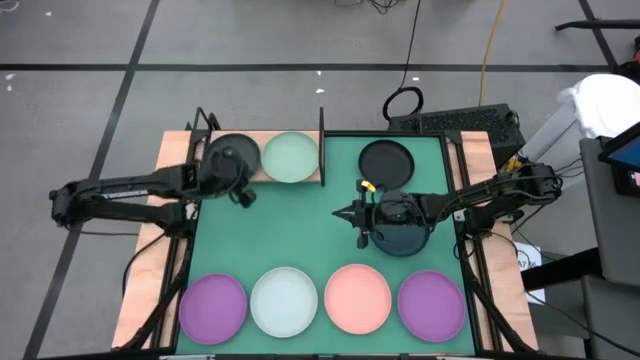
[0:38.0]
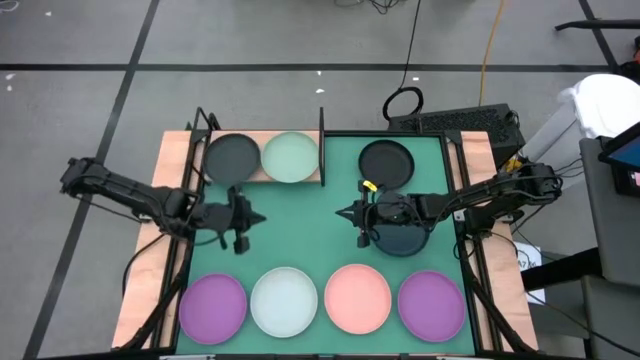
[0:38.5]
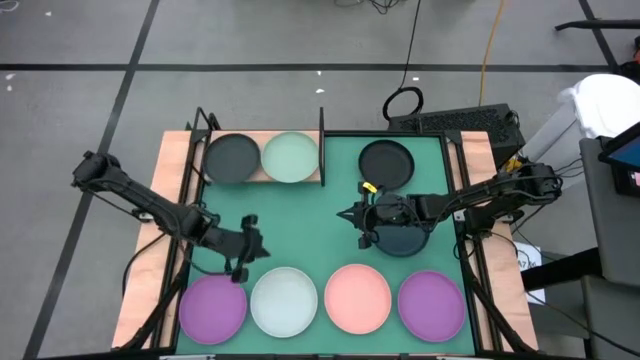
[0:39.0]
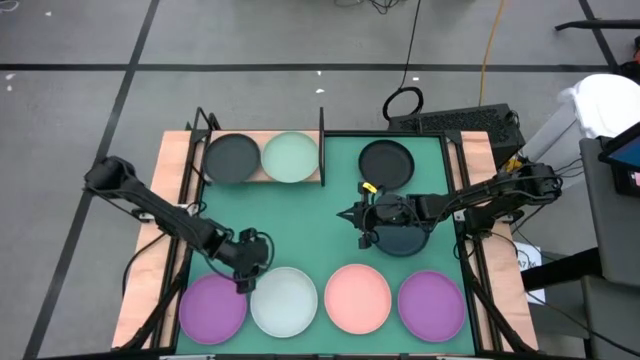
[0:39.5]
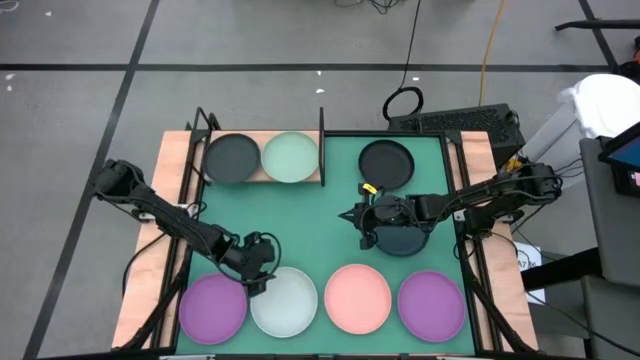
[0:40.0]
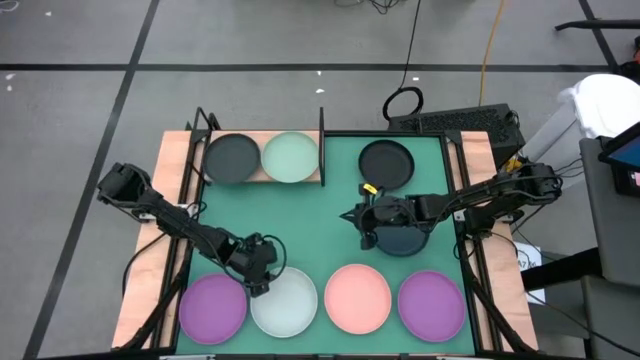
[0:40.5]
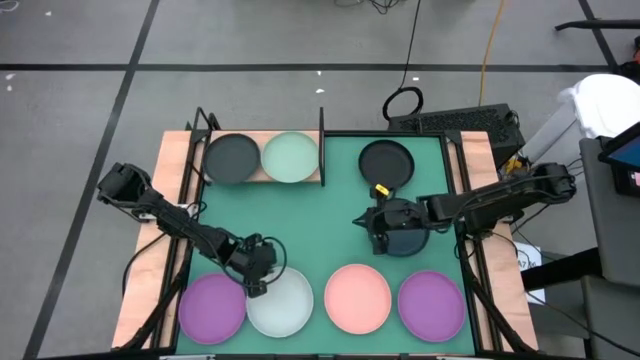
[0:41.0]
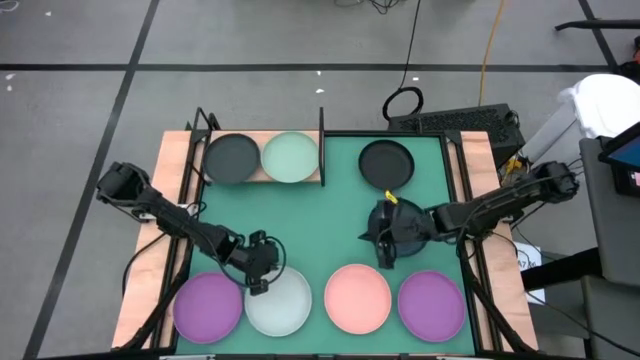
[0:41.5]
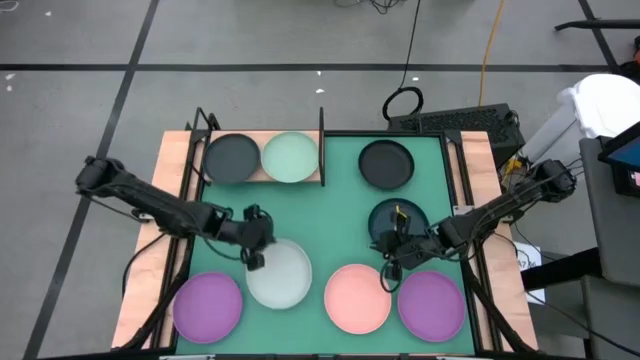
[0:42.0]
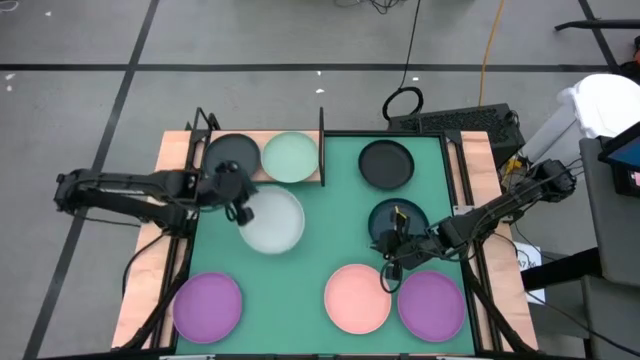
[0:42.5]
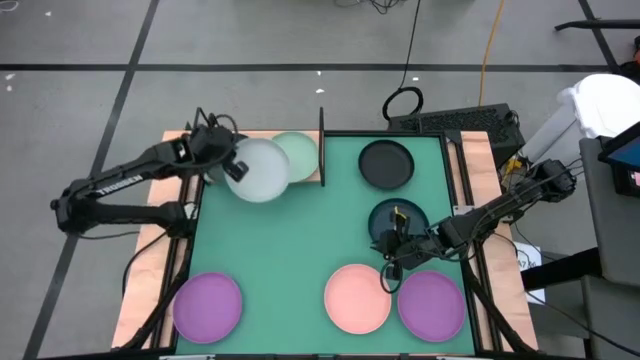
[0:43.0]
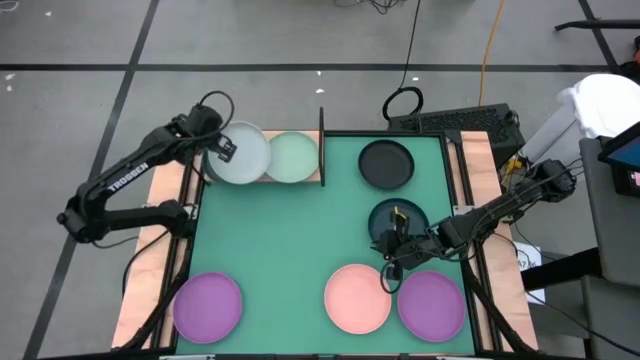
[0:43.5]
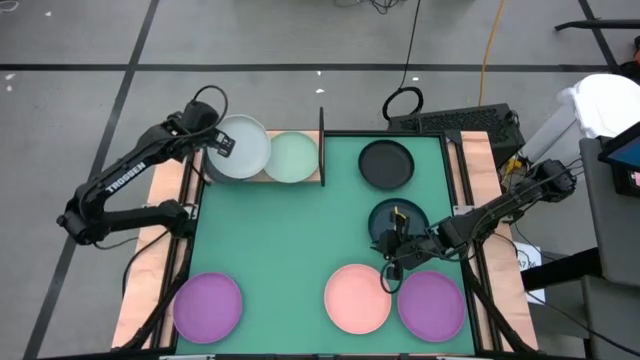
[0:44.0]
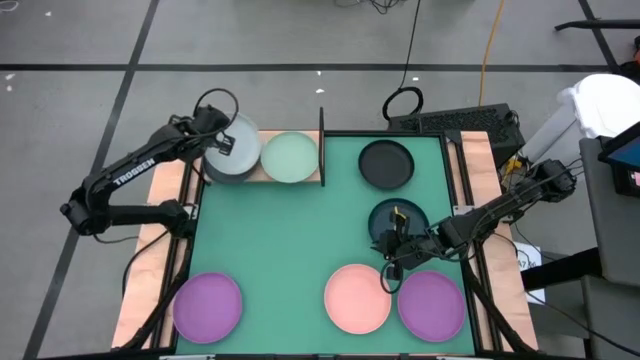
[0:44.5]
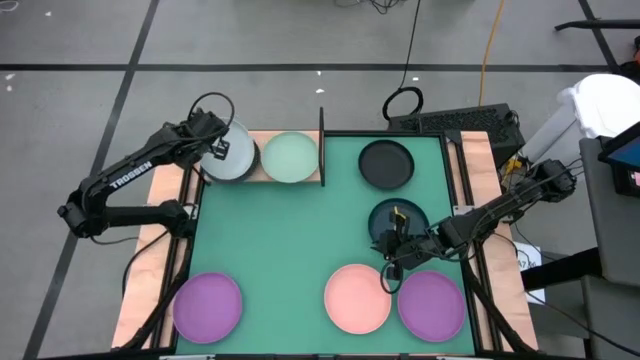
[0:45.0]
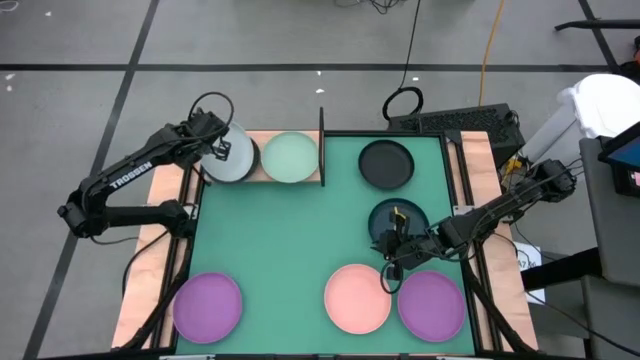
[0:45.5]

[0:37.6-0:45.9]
Task: Place and stack plates onto a shelf
Stack the gray plate on top of the the black plate on the shelf

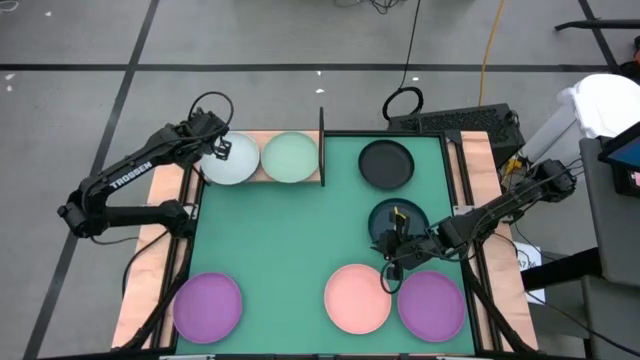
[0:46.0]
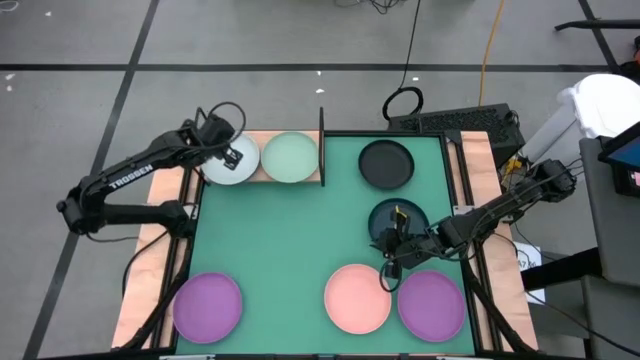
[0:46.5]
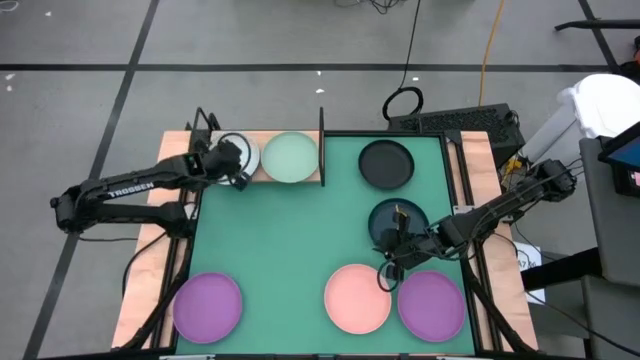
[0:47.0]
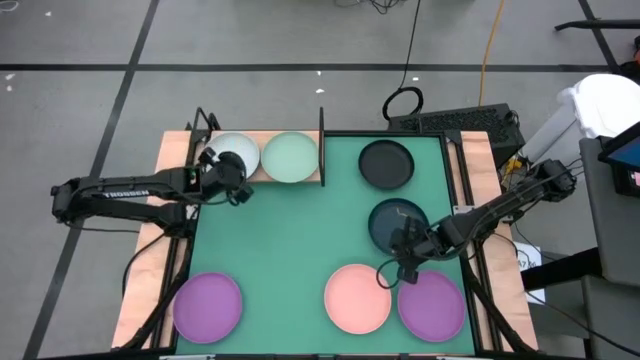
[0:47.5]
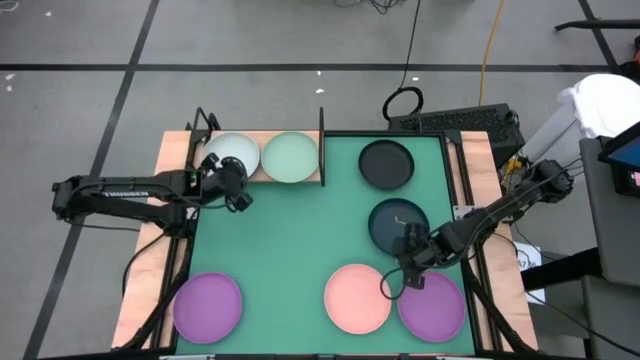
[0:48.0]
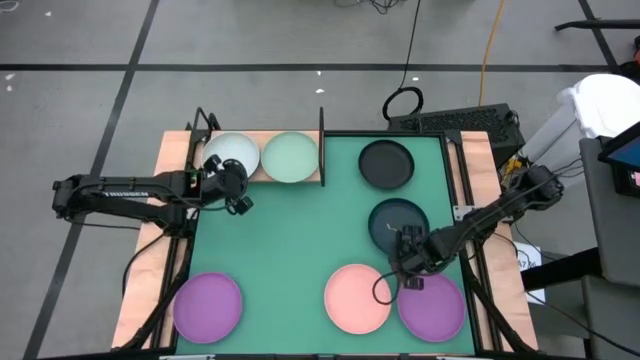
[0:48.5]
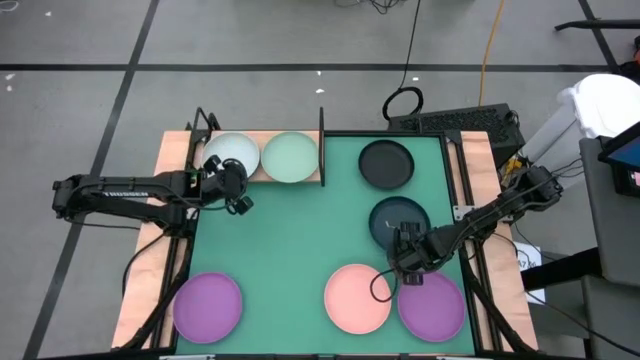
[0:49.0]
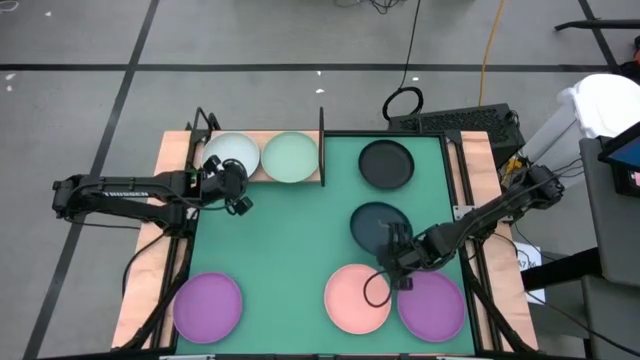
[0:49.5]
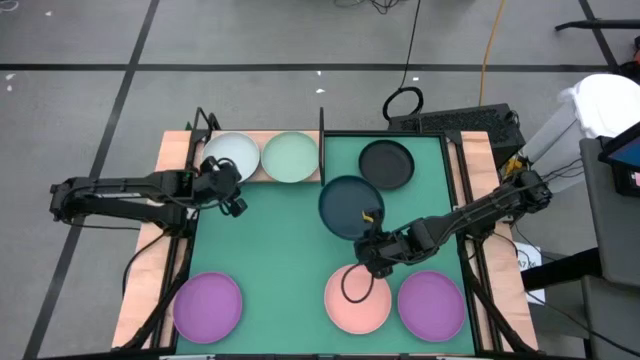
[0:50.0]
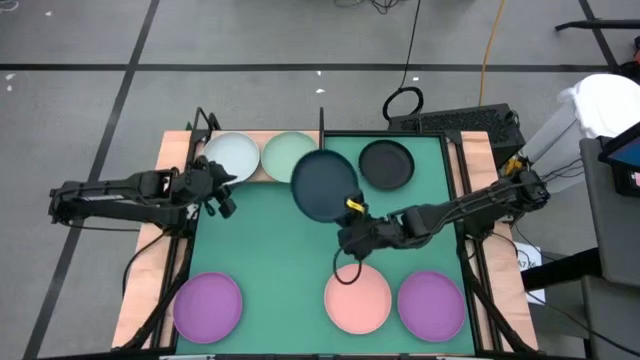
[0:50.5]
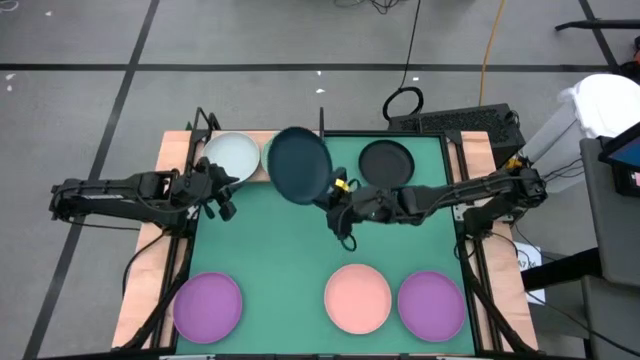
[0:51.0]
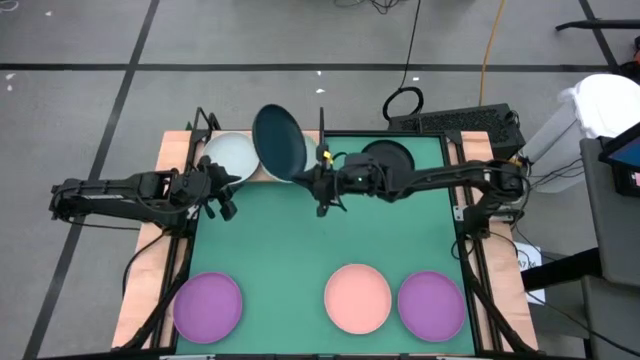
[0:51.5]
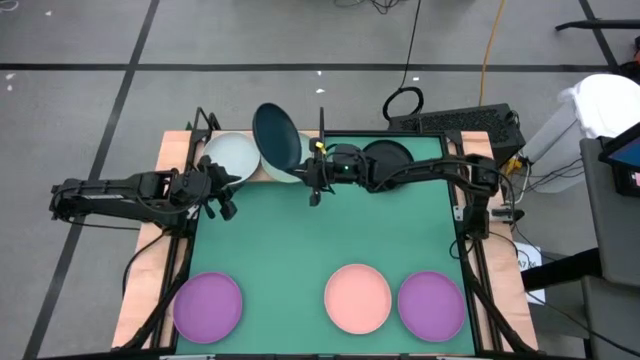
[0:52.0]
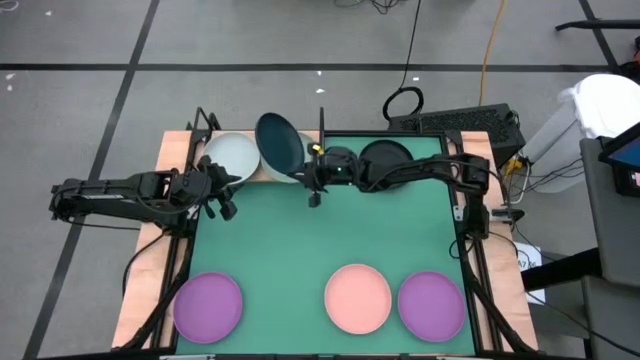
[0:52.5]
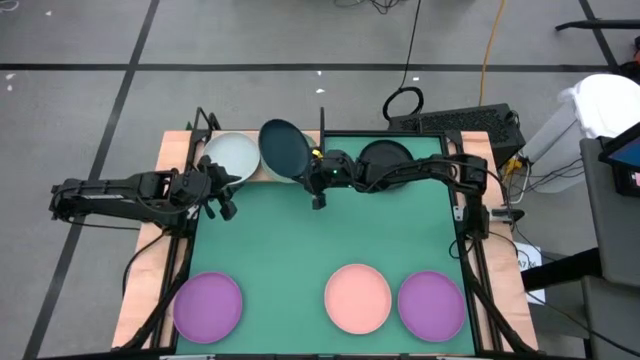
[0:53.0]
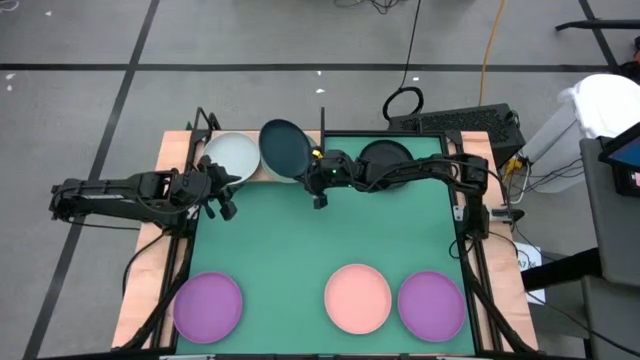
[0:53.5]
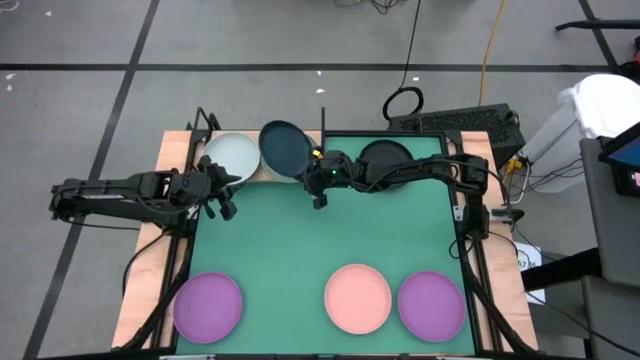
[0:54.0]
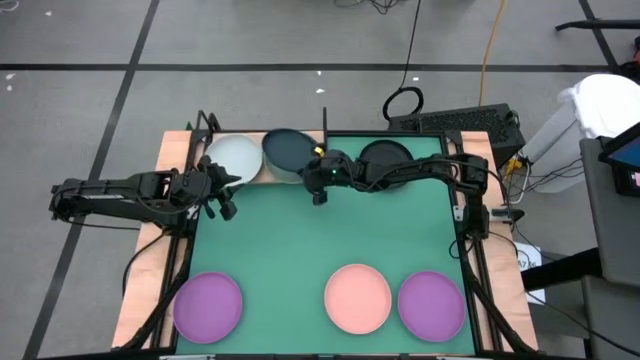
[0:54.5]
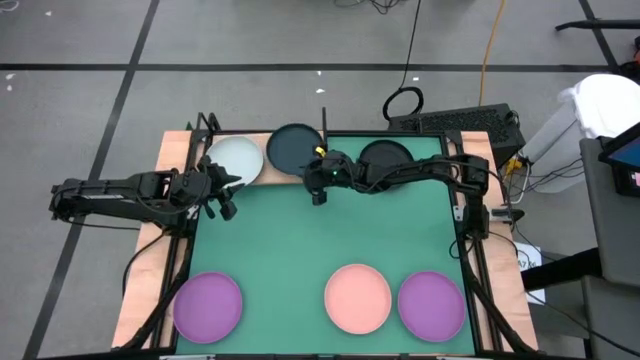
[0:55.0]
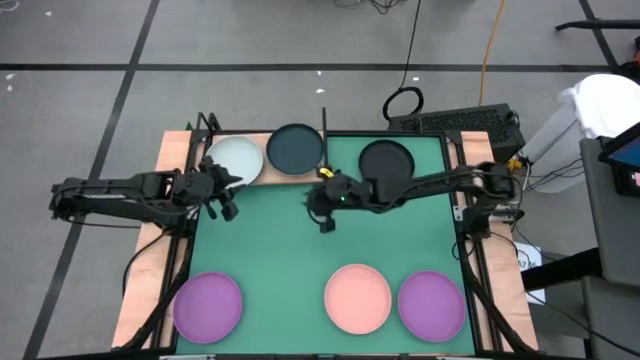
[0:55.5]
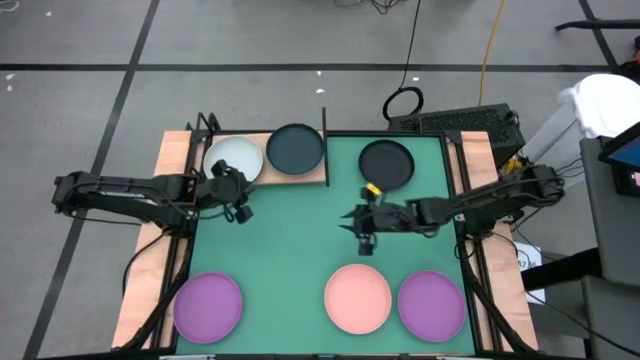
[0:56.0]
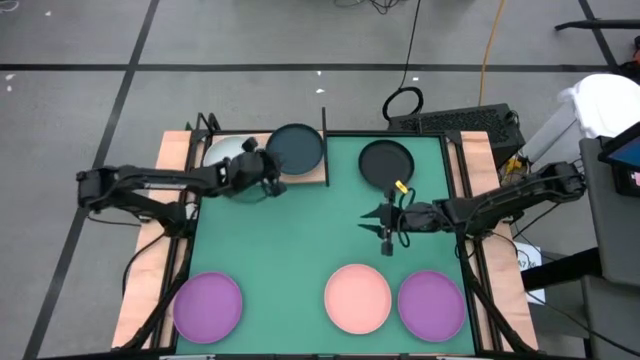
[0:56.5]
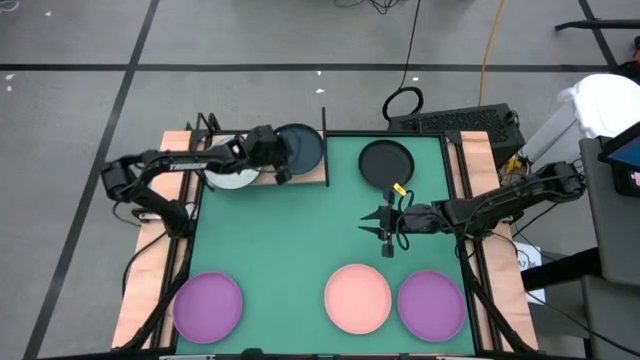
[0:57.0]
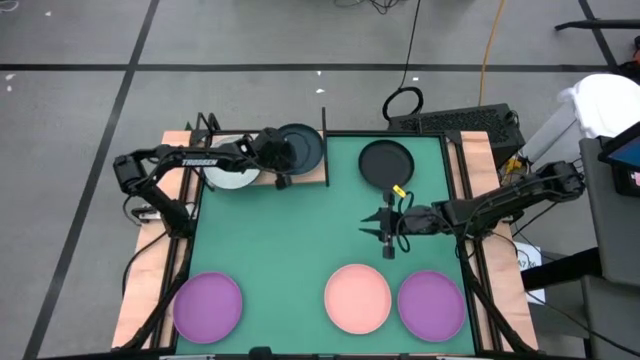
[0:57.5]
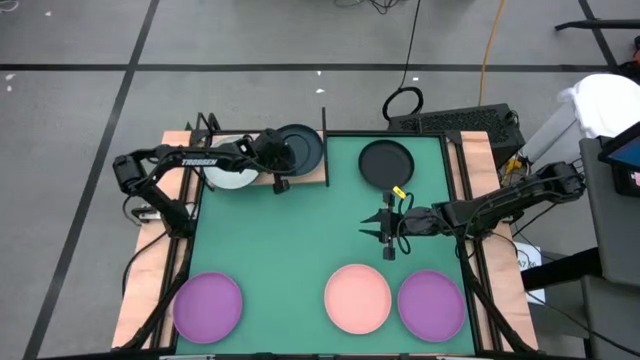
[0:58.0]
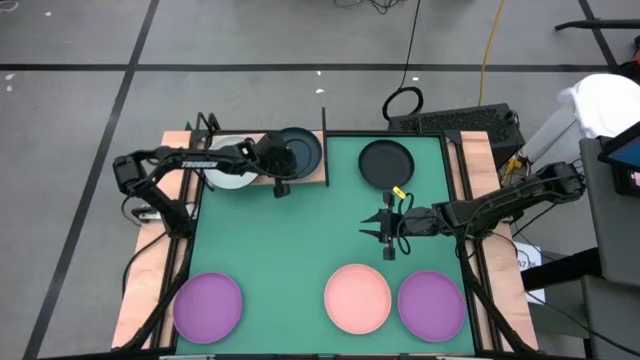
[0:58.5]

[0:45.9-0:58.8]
Stack the dark blue plate on top of the light green plate on the shelf

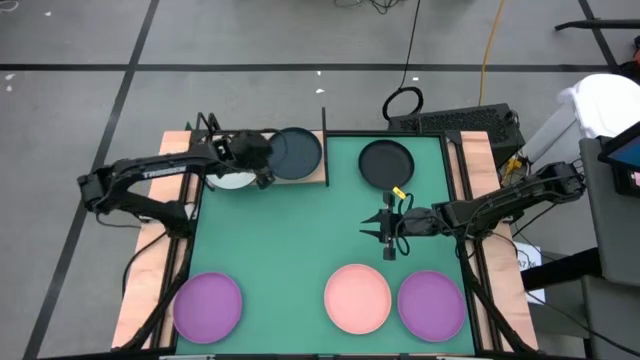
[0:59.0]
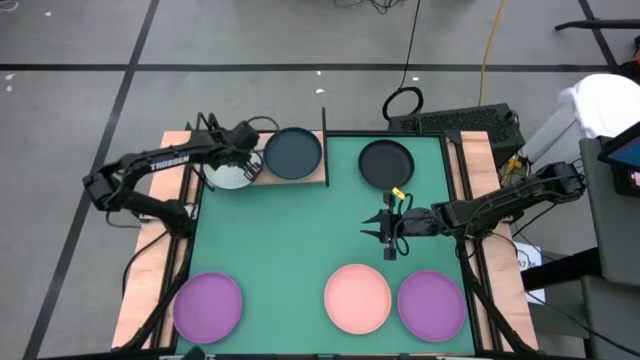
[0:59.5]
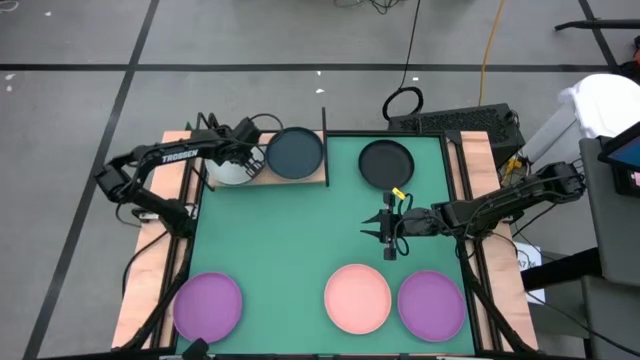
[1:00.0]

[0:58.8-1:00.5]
Adjust the gray plate on the shelf
